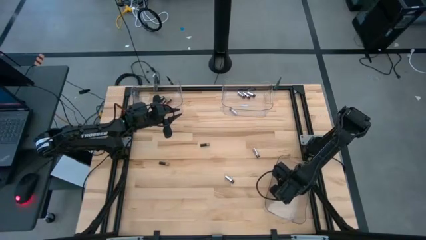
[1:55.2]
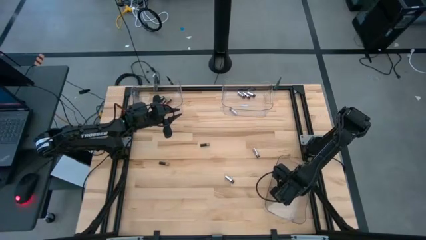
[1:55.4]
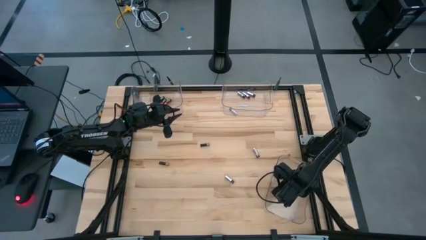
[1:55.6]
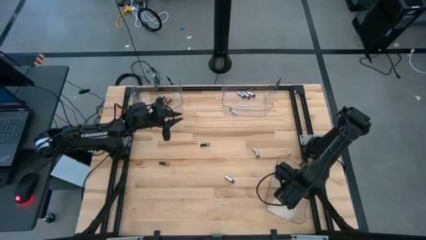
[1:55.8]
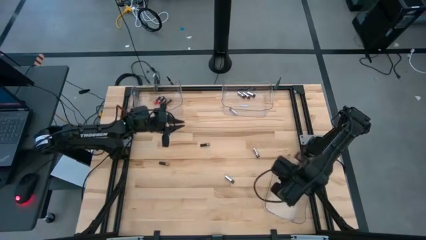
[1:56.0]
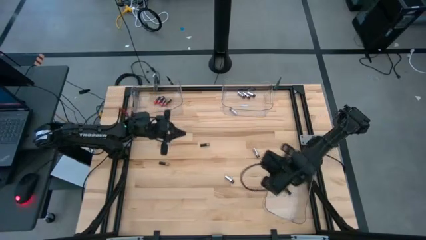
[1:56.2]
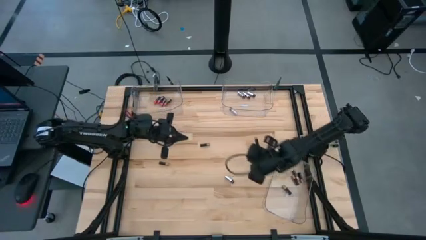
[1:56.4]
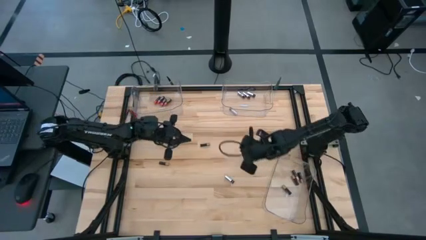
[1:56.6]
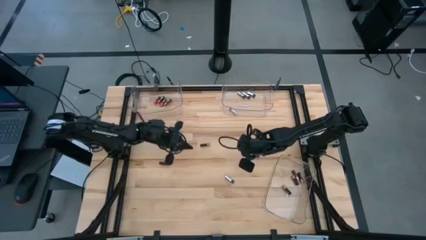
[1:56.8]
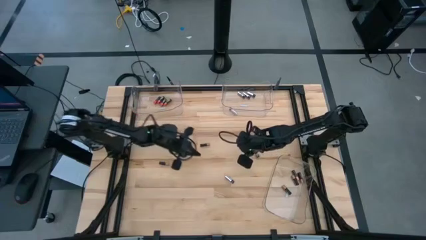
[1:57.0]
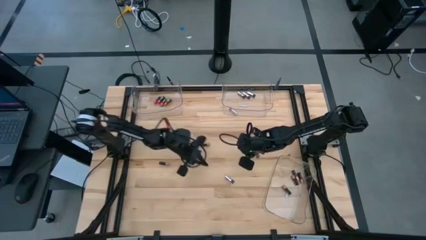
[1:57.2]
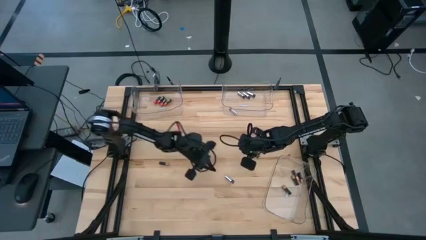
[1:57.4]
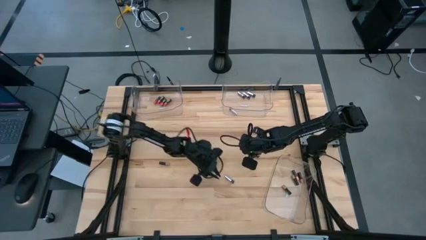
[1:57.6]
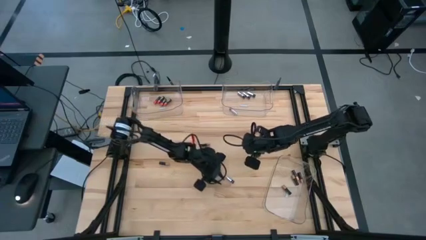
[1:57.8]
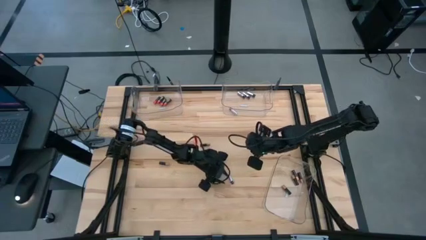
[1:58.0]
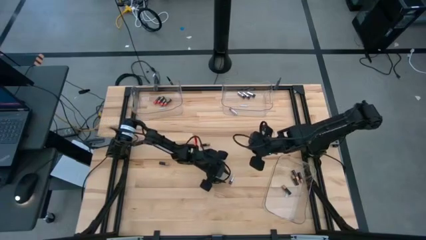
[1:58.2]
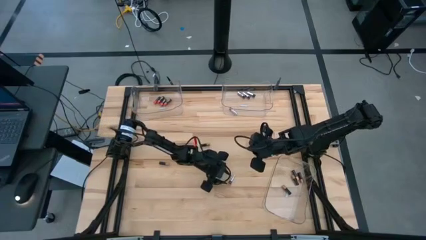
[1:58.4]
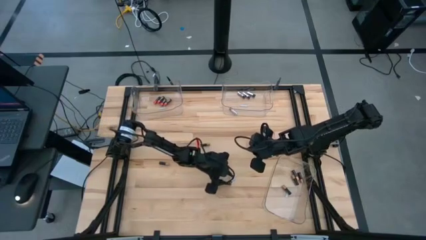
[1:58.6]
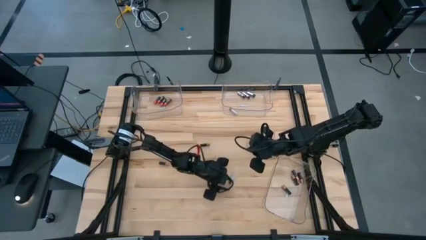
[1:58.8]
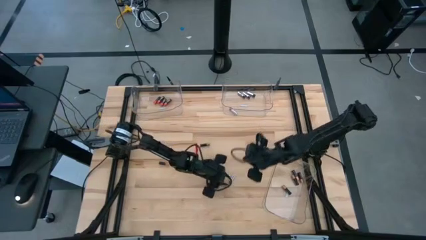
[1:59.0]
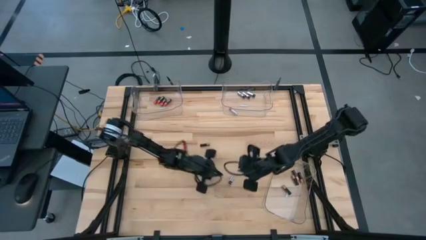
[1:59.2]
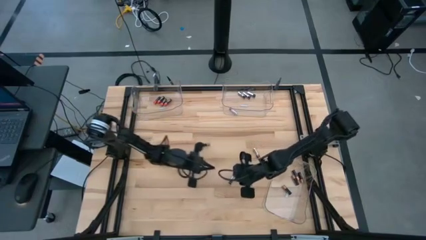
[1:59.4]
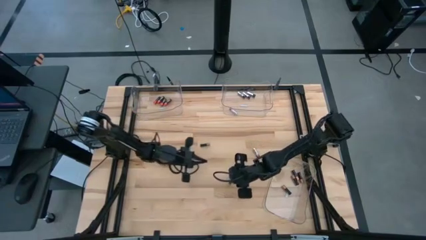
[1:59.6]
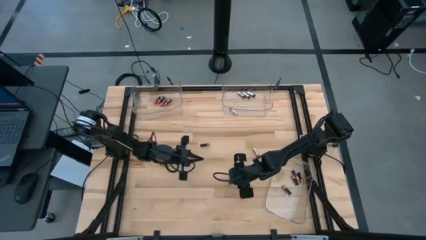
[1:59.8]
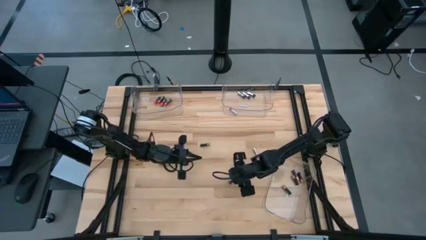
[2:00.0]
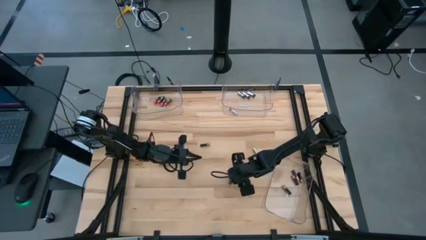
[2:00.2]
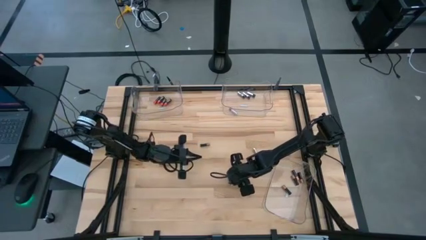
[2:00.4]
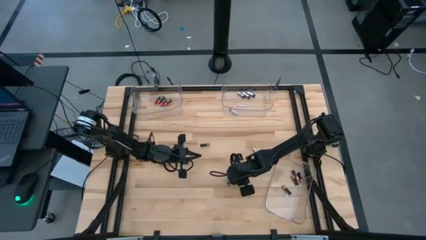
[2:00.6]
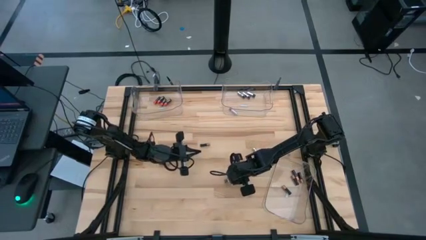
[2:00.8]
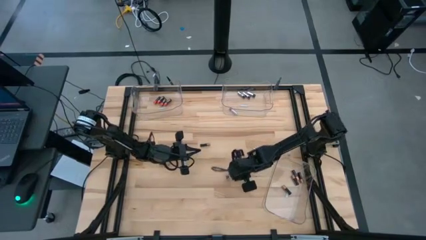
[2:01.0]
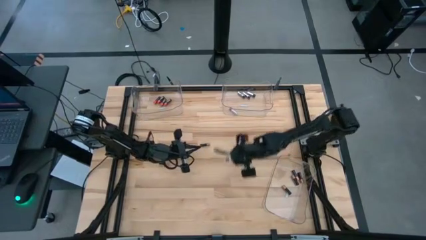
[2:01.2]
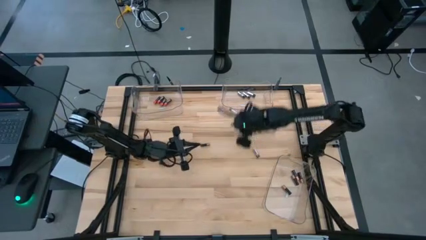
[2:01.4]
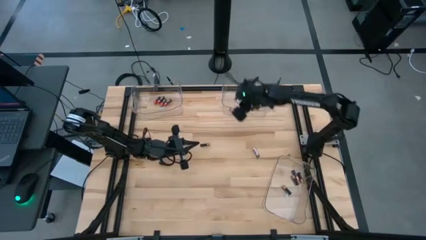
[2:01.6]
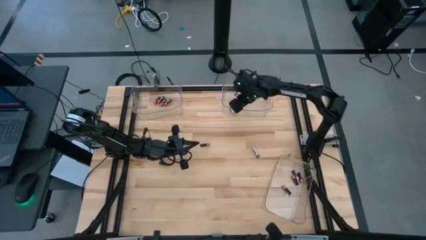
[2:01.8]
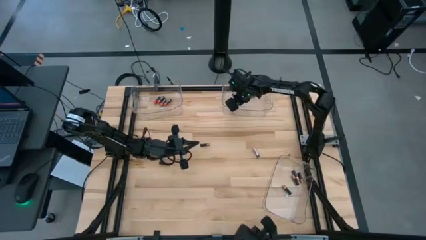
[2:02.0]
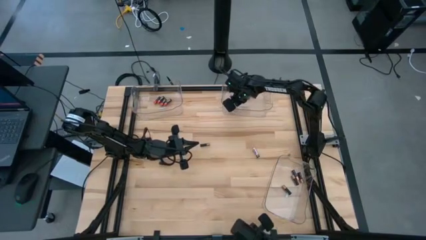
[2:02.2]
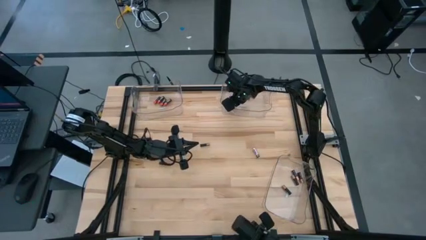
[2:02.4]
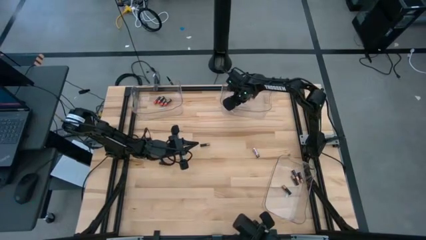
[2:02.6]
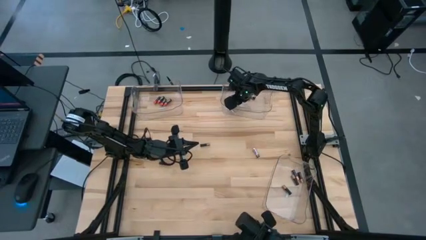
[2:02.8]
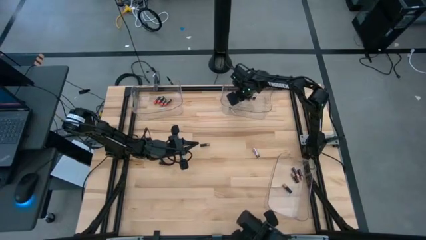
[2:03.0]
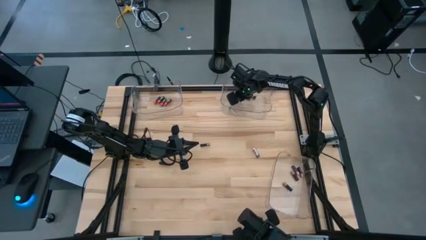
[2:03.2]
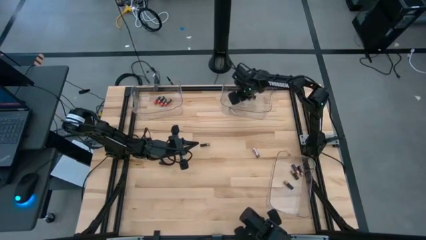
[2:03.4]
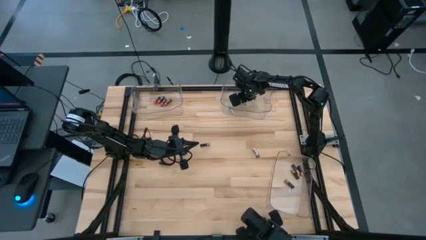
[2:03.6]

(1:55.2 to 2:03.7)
Task: Sort batteries
Put the silver battery into the top right transparent bin

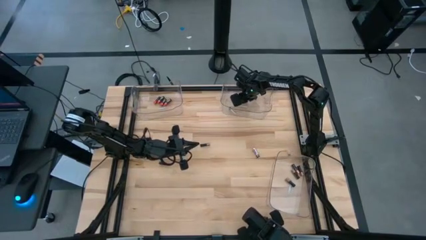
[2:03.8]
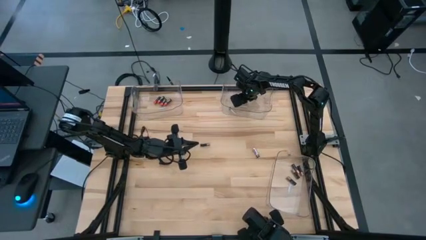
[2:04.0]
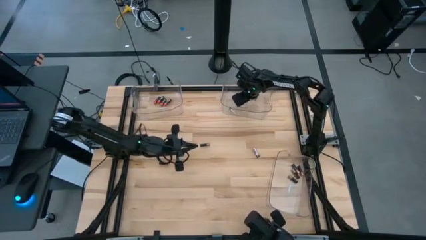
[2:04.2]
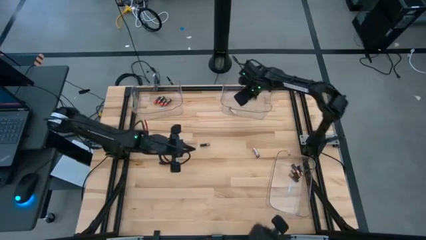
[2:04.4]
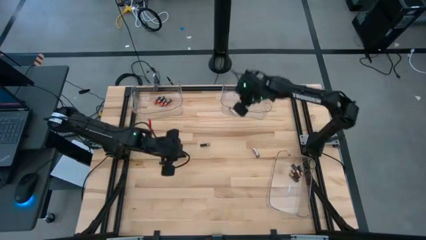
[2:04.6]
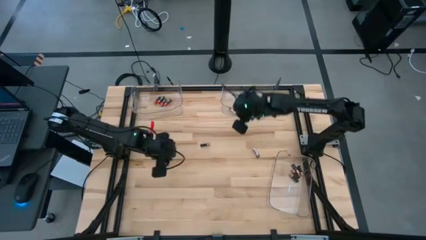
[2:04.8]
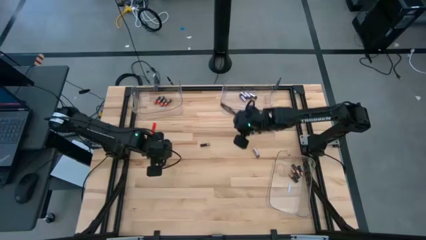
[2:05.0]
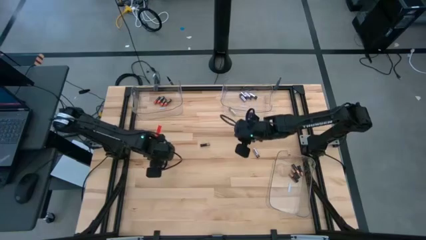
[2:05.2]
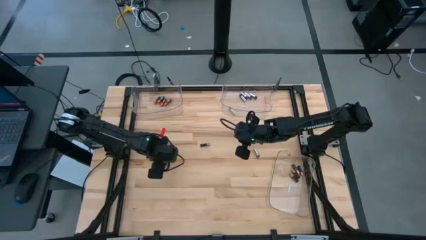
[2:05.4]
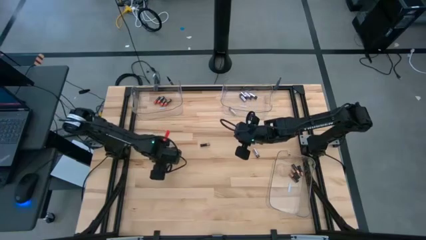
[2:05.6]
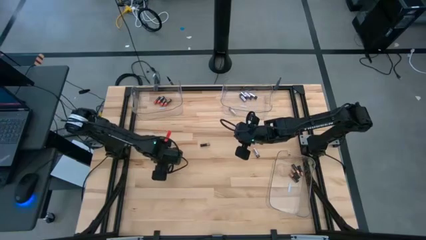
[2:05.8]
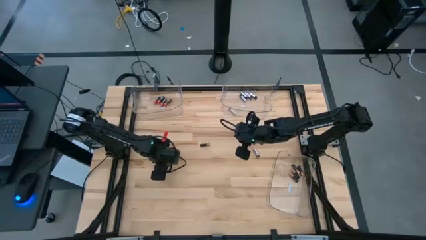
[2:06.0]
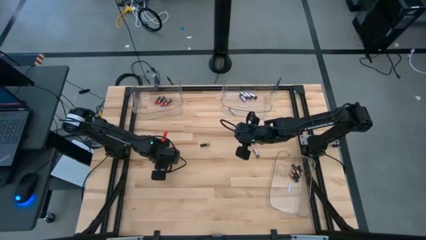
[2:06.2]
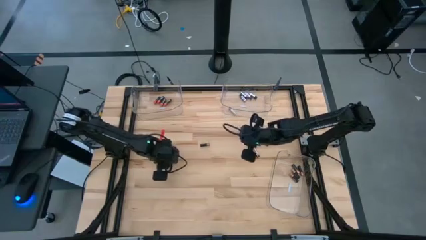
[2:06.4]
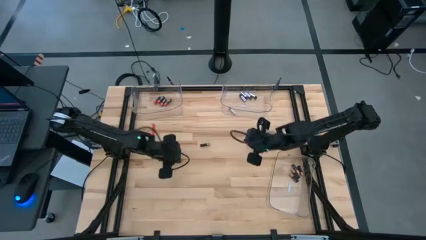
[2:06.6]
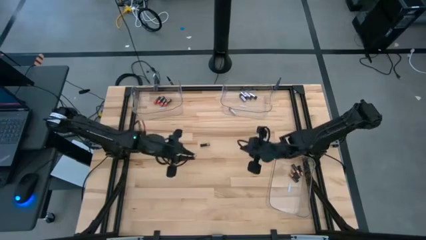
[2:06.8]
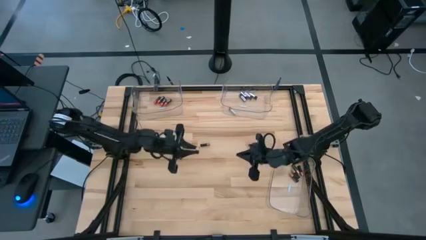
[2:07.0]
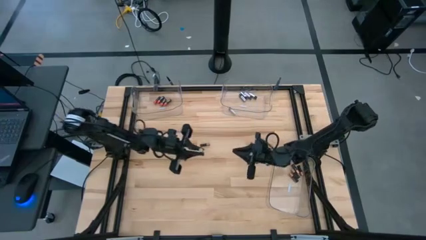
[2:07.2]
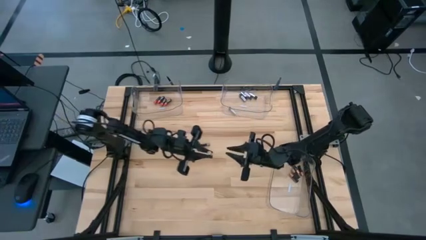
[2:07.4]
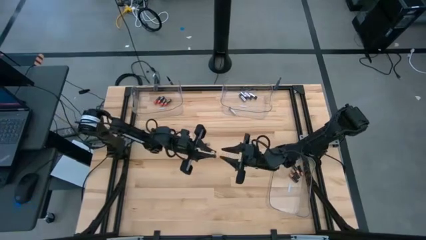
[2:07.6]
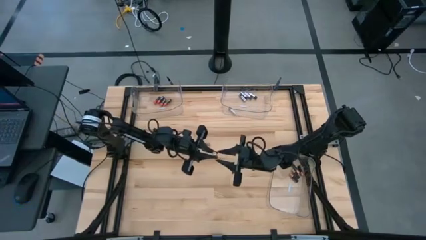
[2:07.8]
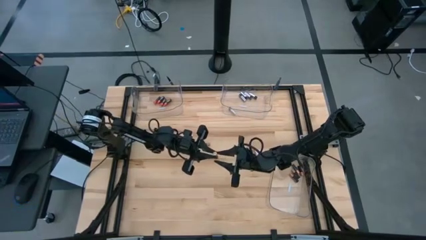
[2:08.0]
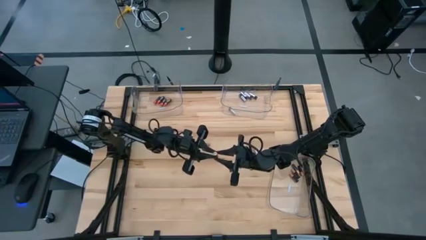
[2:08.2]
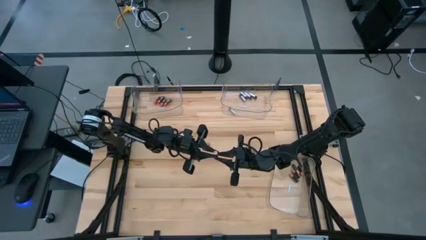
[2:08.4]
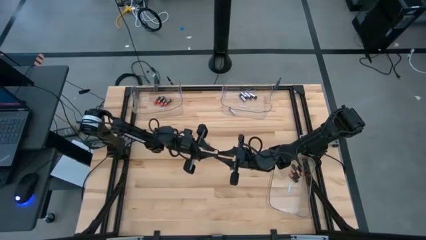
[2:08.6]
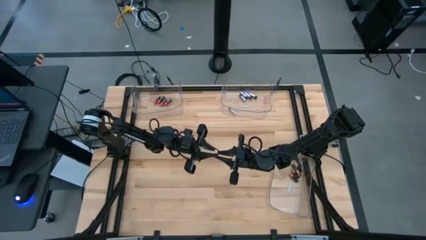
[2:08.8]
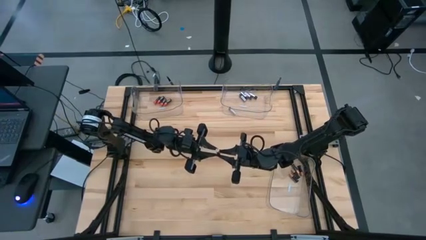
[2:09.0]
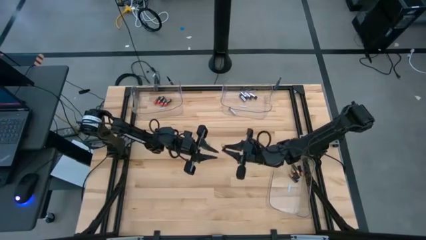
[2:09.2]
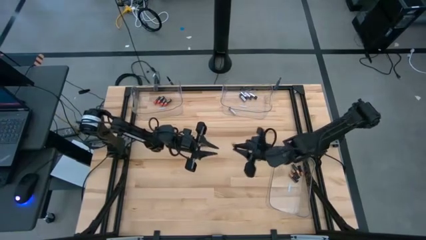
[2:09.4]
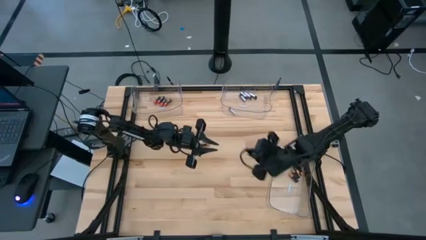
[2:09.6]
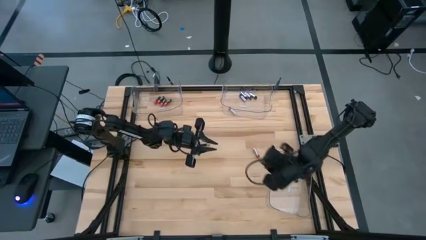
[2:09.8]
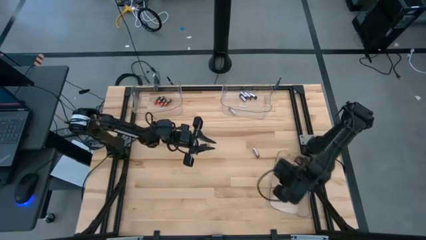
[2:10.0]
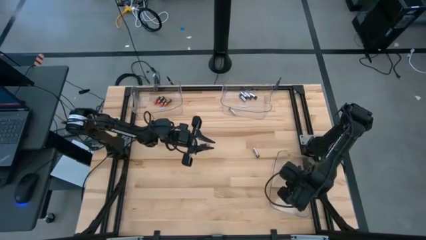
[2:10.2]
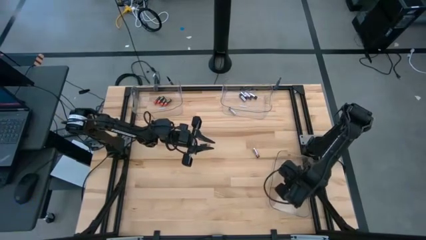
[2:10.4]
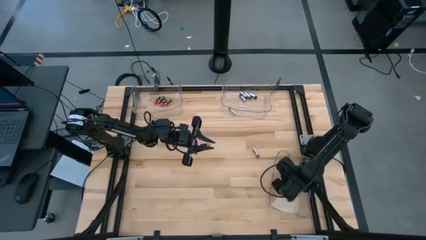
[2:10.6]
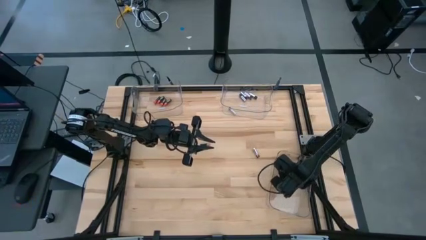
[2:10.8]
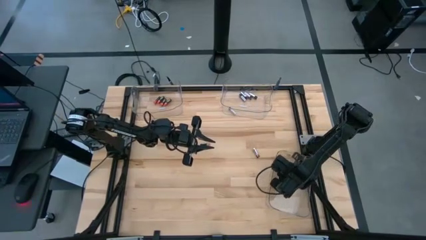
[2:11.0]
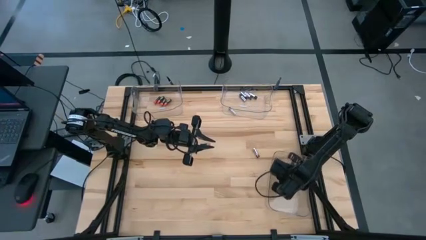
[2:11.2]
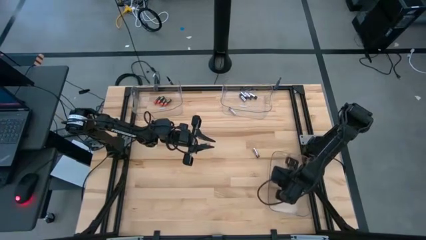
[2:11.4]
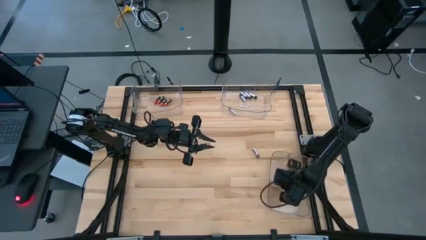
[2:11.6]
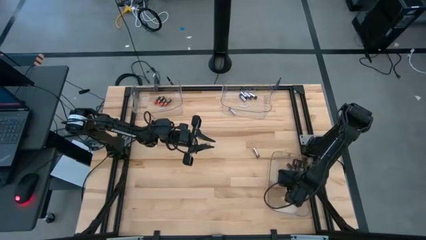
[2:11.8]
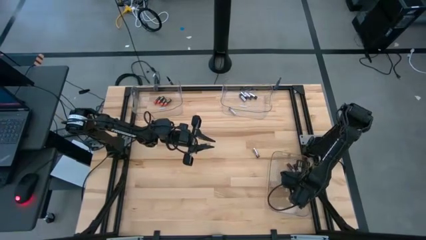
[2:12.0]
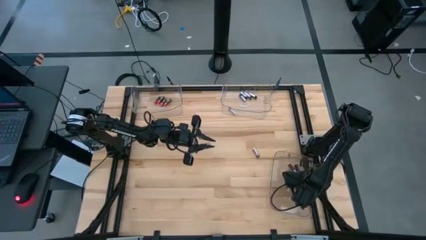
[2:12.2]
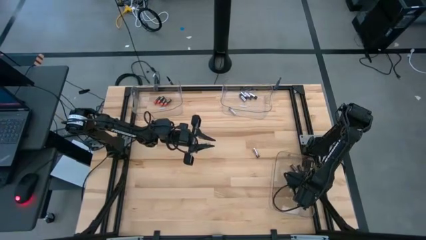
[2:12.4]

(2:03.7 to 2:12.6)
Put the brown battery into the bottom right transparent bin
